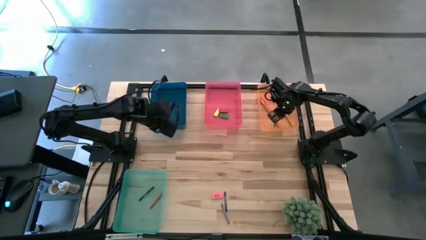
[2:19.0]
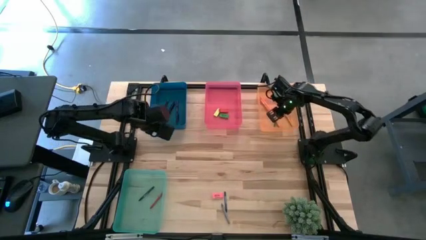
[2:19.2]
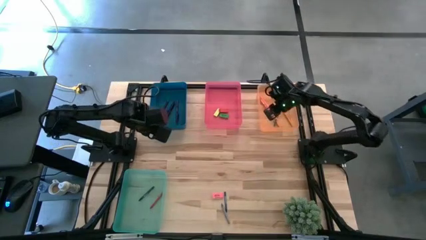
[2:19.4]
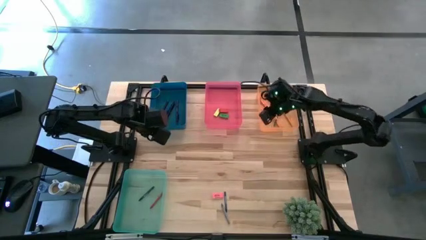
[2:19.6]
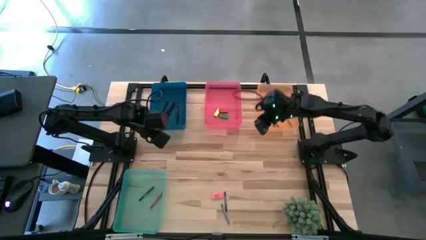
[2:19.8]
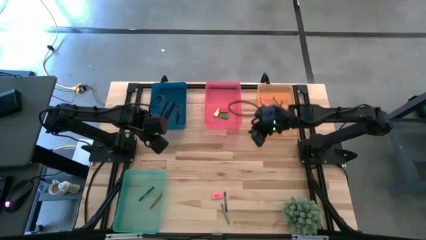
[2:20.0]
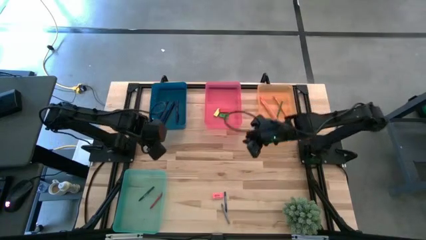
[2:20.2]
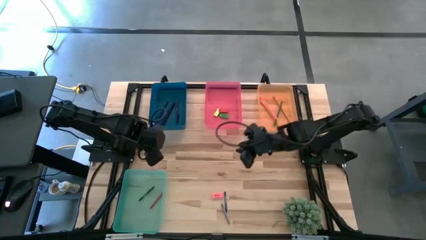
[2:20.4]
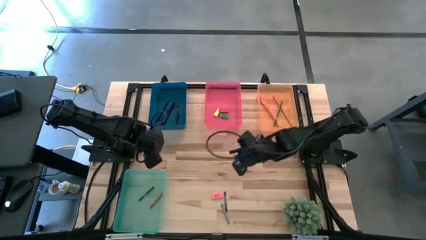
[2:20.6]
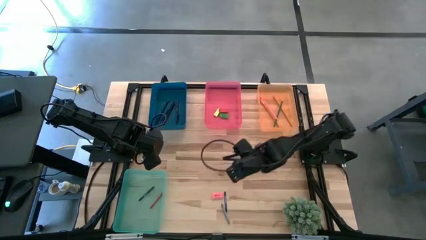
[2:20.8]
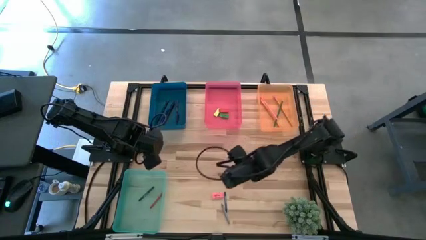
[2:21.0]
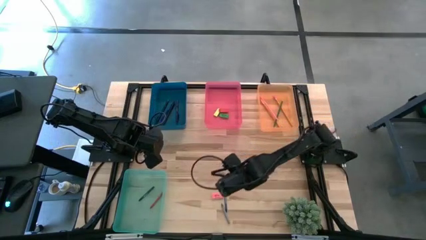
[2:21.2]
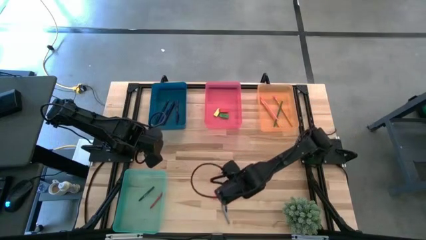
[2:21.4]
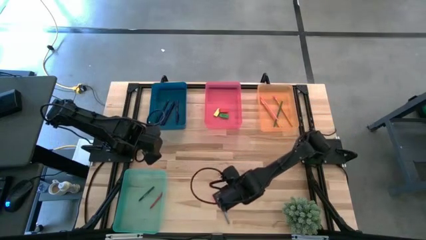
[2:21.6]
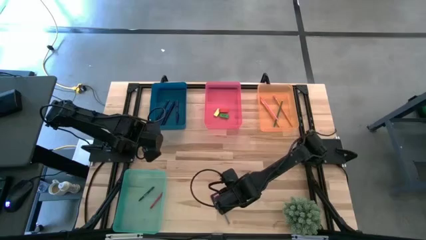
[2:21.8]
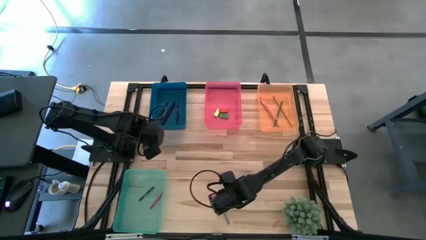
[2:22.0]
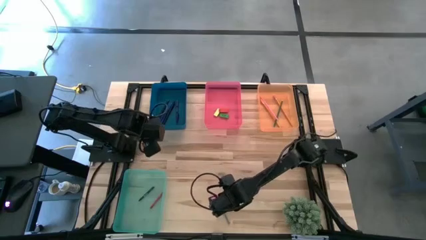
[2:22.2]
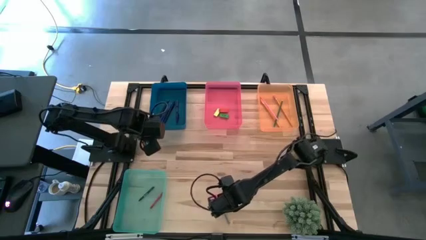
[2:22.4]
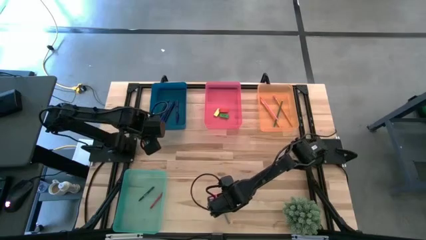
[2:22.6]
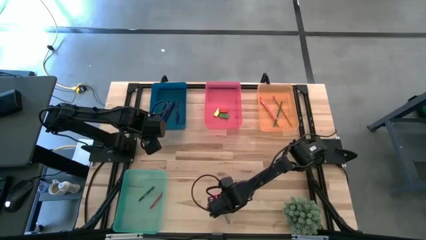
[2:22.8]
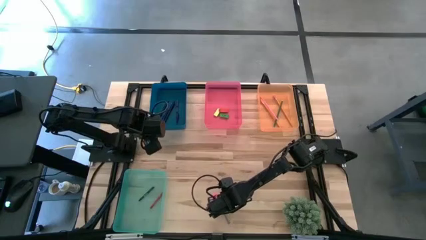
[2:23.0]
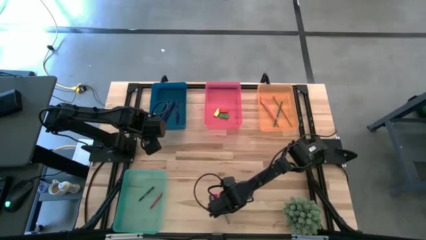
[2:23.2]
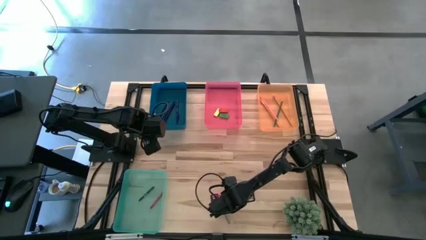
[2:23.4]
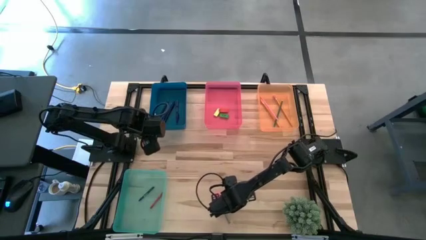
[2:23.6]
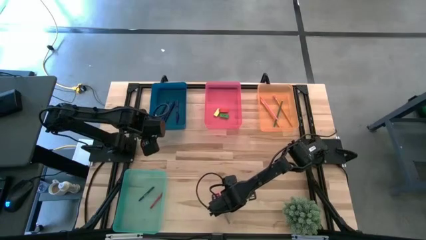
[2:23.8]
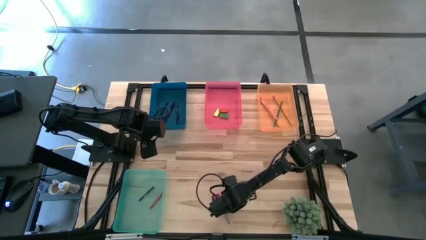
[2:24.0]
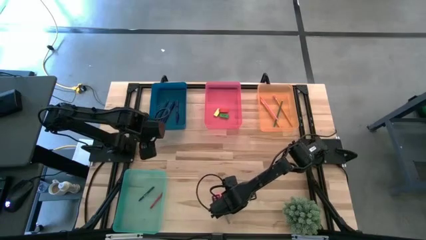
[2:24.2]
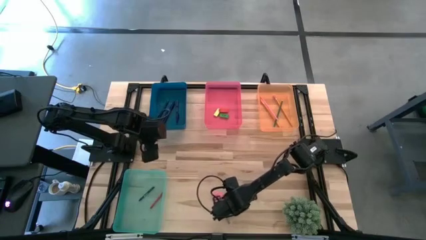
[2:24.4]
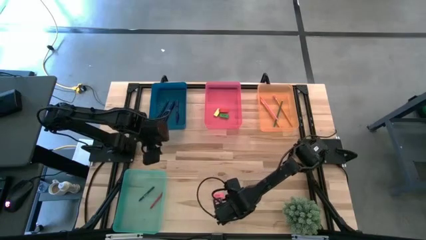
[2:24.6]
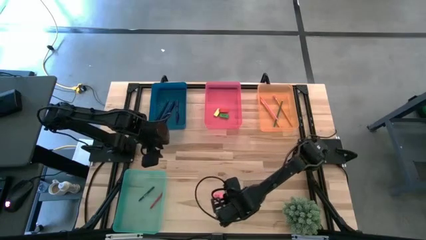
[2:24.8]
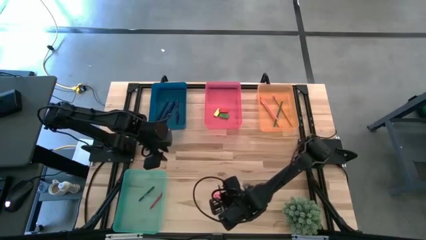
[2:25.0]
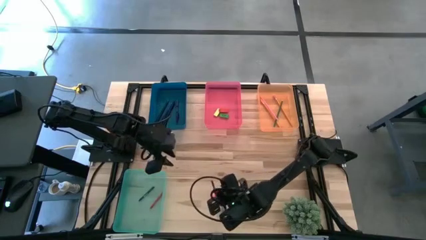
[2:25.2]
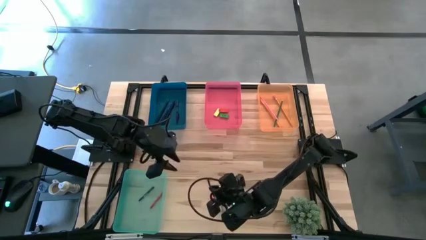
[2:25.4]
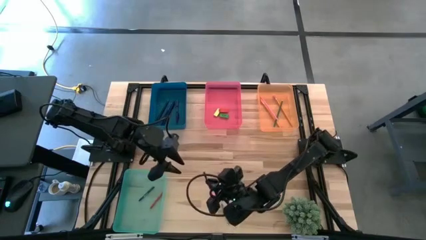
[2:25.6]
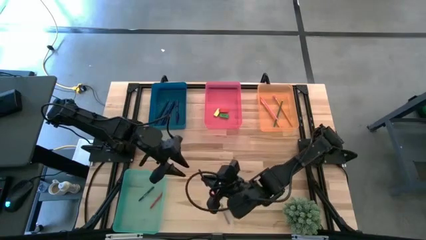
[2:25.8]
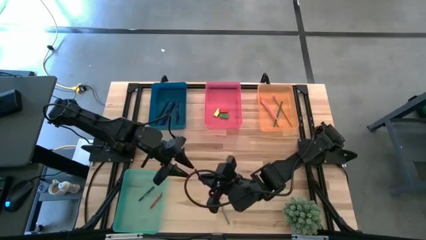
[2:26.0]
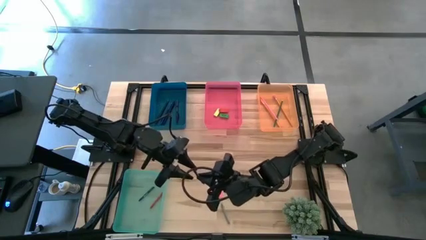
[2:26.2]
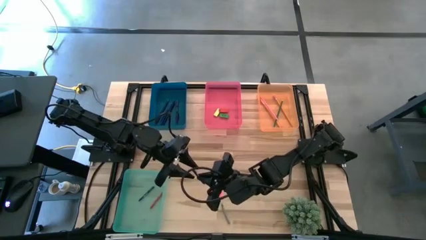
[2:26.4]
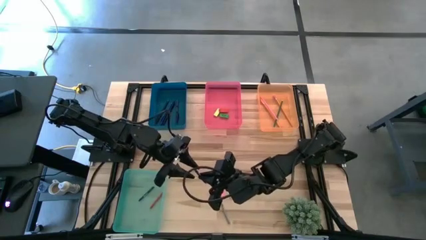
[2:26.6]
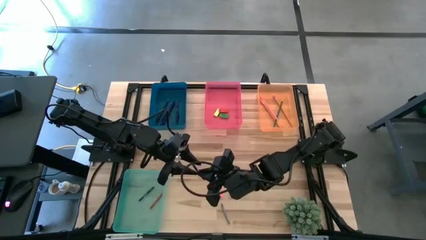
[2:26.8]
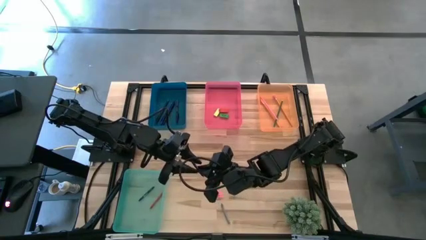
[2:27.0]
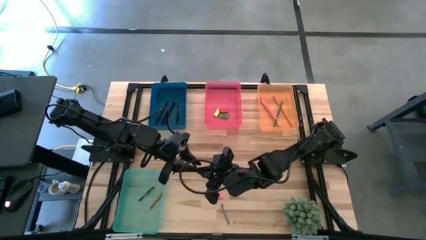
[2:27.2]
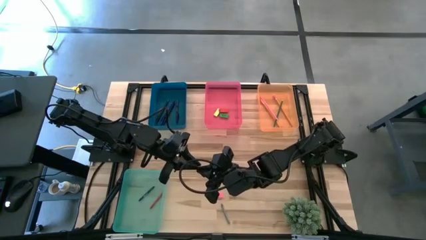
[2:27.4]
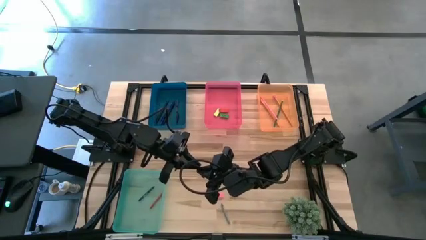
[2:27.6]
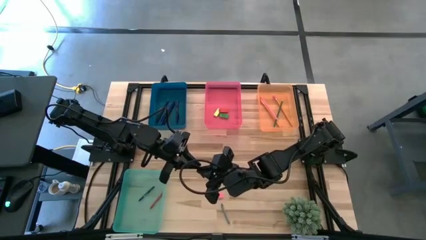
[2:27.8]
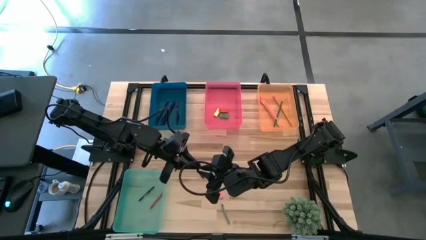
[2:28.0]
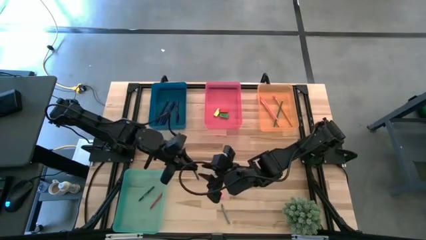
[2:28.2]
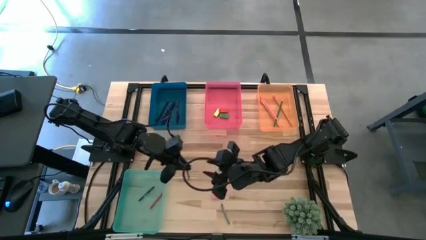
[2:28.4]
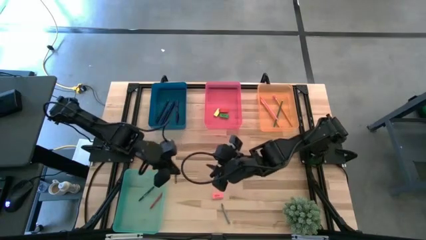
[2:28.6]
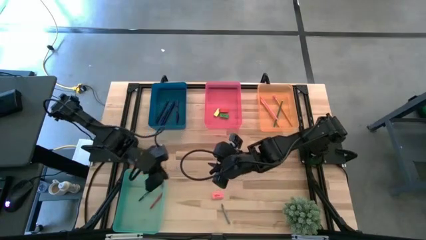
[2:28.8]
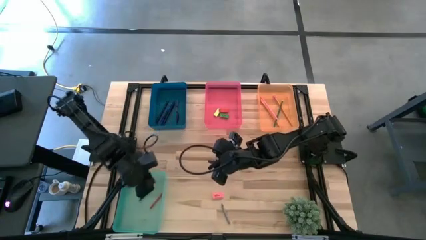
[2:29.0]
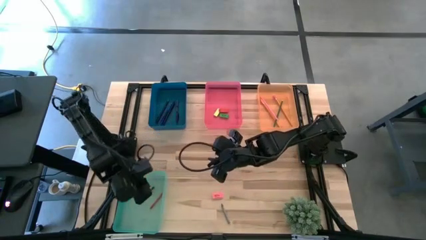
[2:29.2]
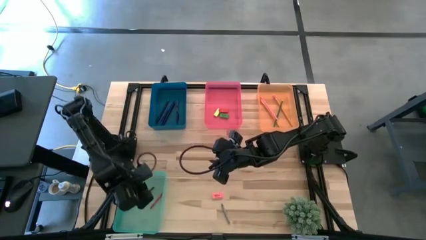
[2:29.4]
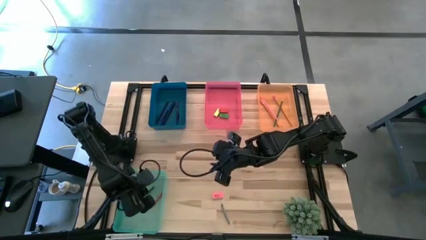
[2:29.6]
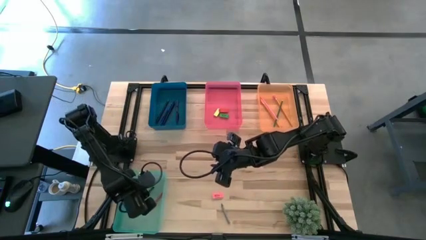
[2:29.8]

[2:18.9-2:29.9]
Task: Sort crayons/erasers/pens/pencils in bins
Put the blue crayon into the green bin

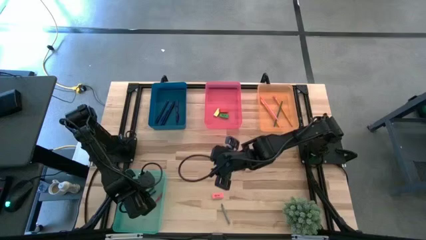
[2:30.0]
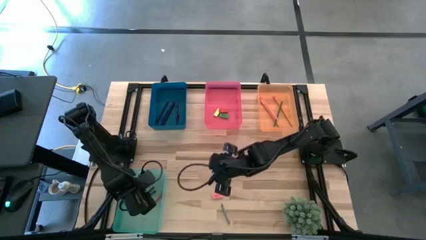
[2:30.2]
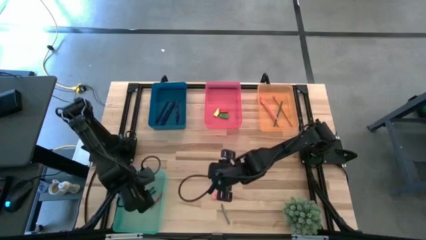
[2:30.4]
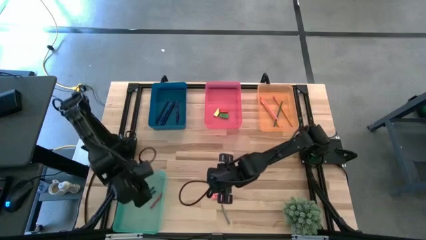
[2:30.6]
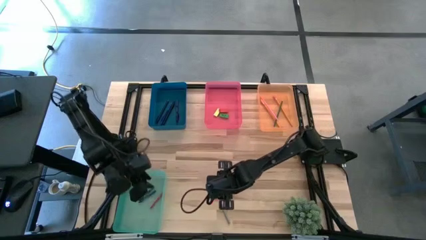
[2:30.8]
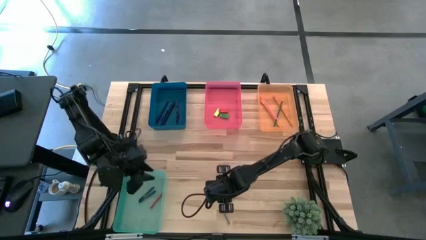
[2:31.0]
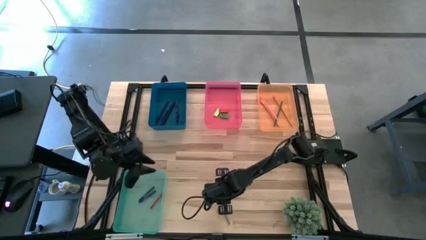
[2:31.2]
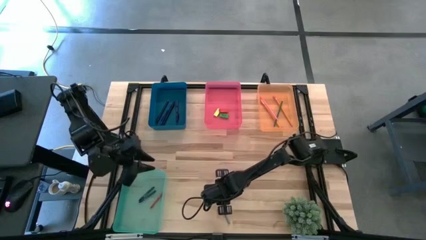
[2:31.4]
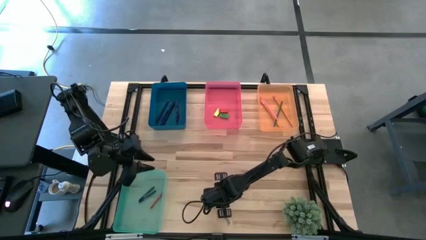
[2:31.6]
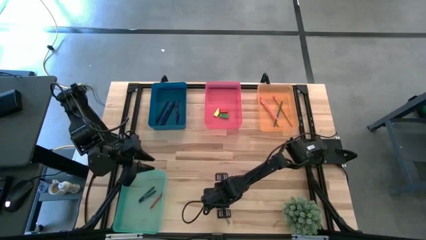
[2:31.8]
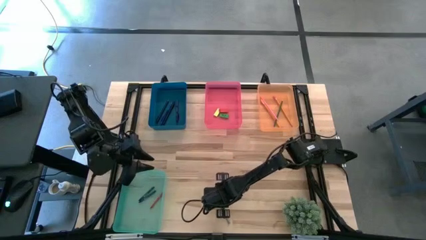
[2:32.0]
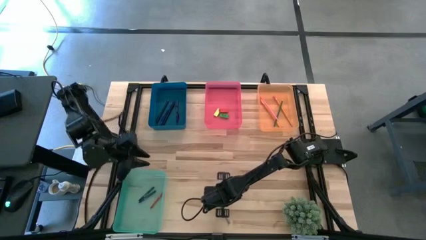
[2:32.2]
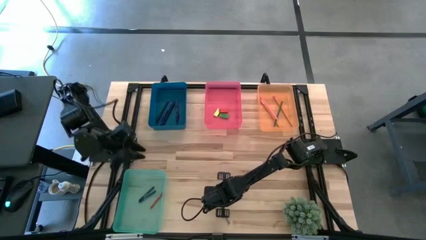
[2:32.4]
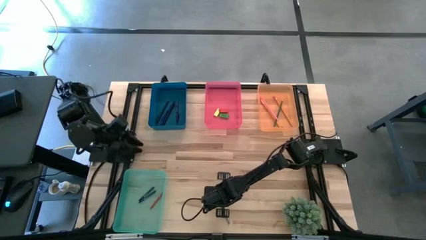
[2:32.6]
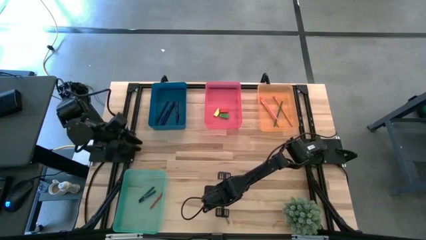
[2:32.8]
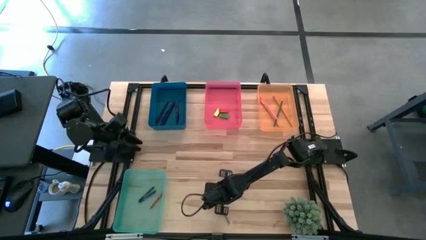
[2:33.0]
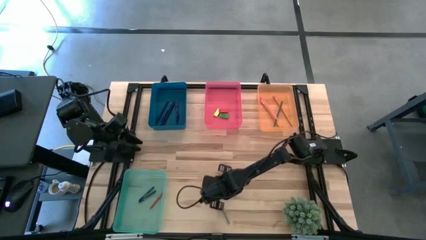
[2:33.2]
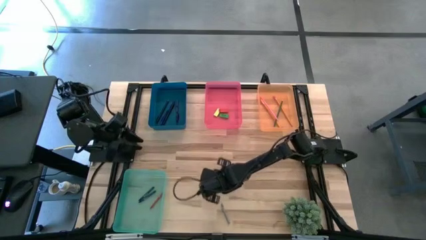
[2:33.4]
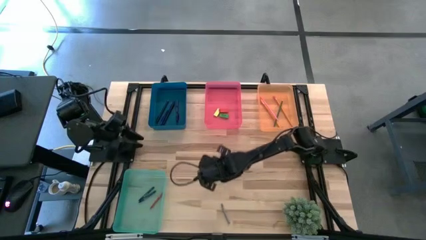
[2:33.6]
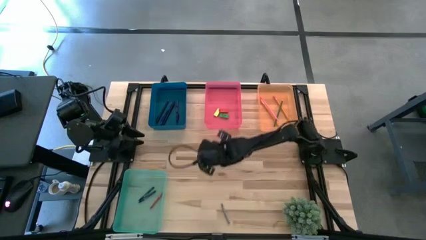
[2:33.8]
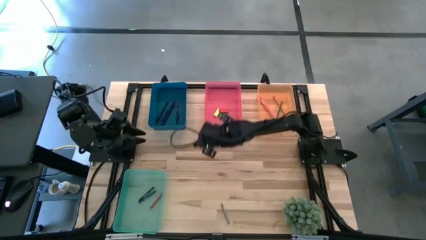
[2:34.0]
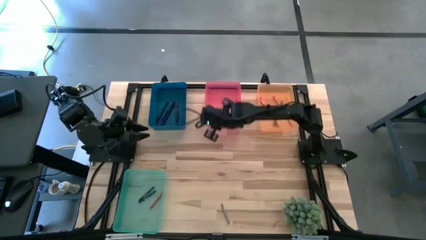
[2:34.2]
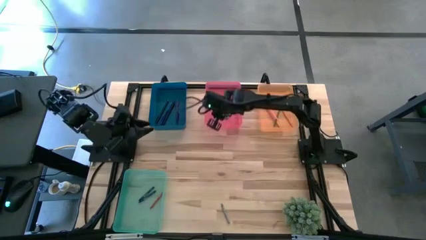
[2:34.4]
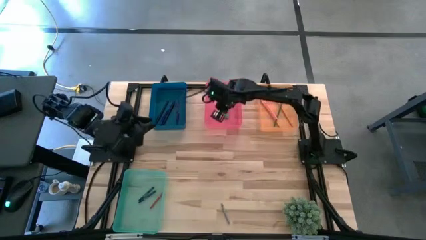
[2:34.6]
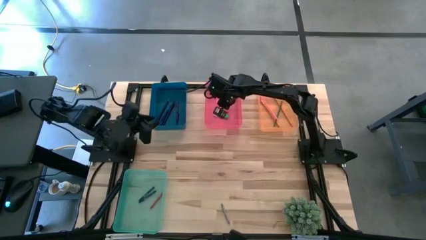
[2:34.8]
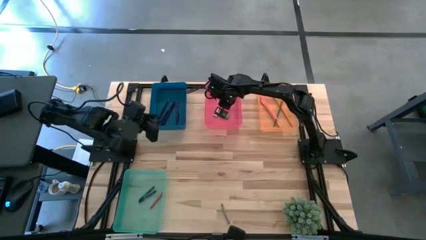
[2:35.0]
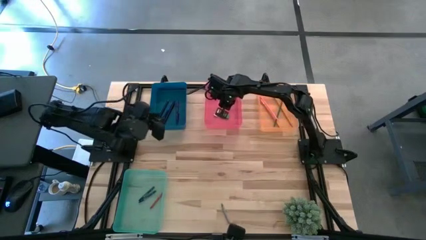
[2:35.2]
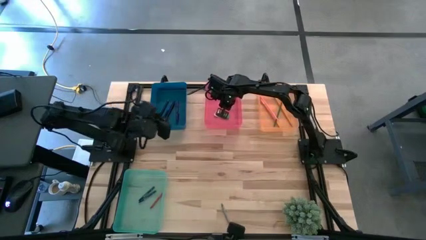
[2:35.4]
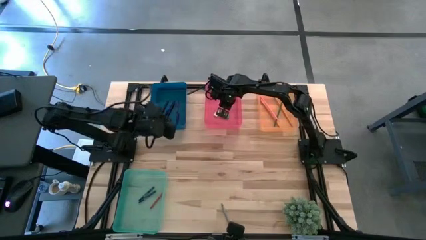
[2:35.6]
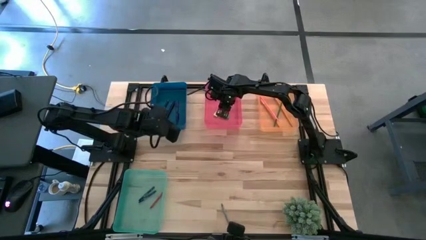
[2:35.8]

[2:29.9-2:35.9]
Put the pink eraser into the pink bin
